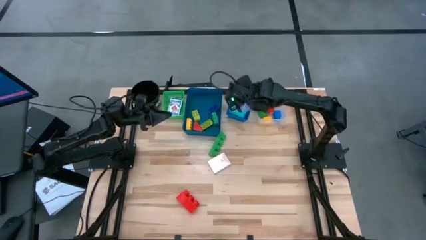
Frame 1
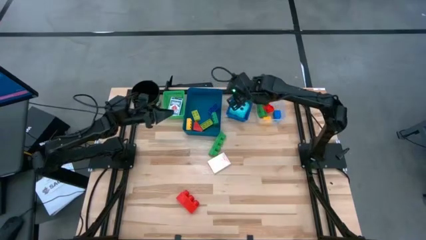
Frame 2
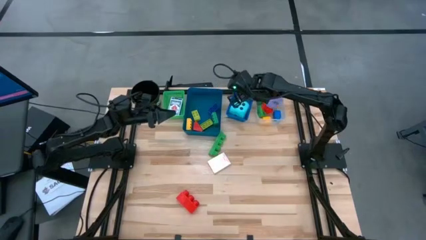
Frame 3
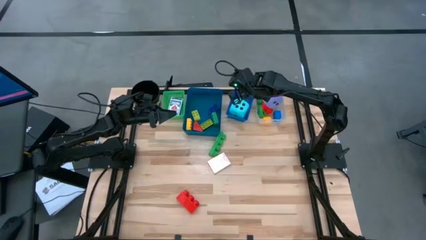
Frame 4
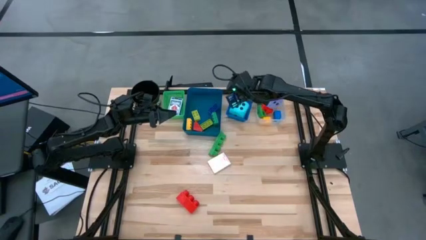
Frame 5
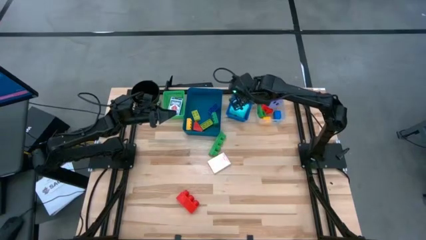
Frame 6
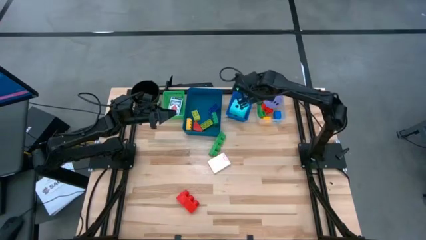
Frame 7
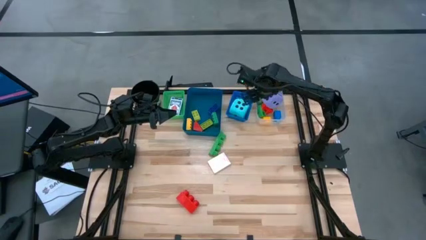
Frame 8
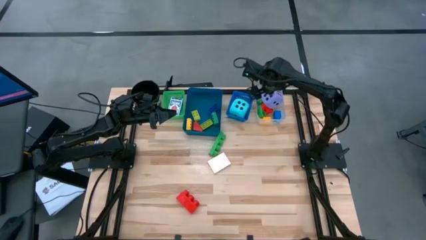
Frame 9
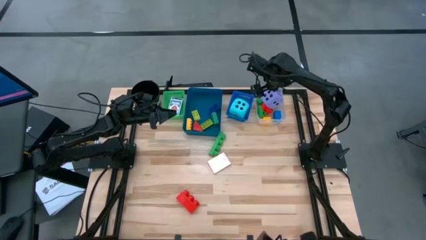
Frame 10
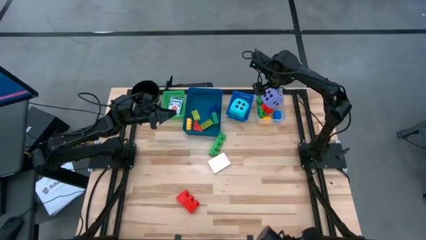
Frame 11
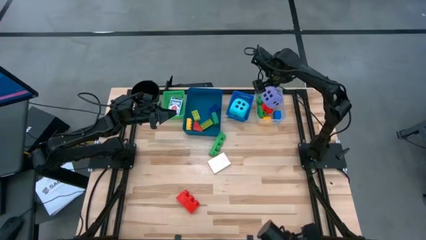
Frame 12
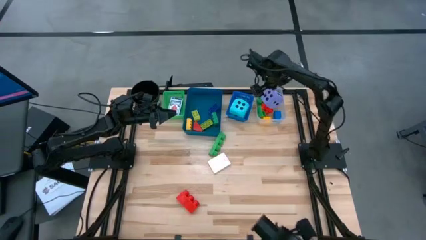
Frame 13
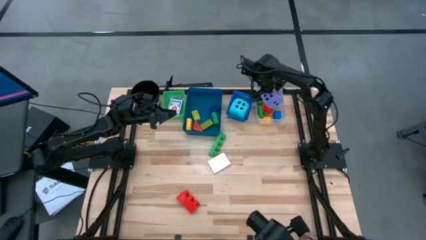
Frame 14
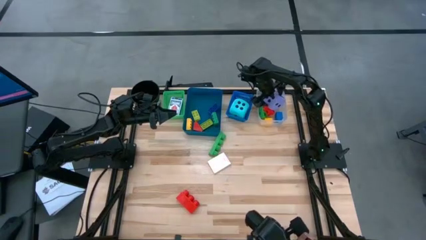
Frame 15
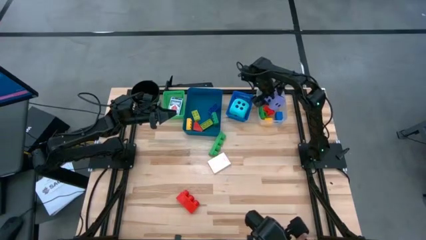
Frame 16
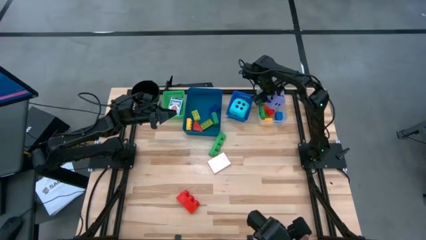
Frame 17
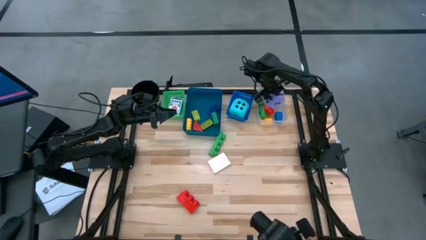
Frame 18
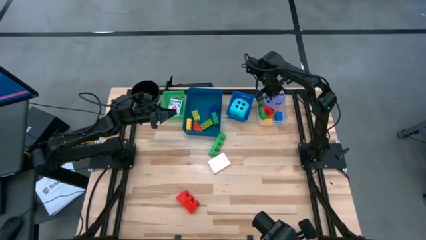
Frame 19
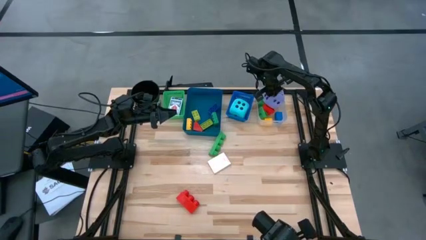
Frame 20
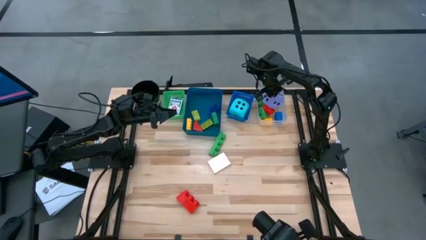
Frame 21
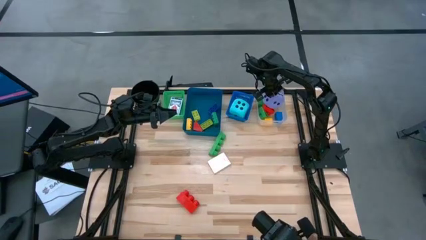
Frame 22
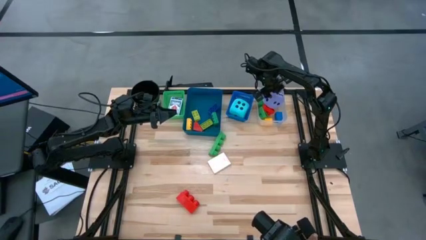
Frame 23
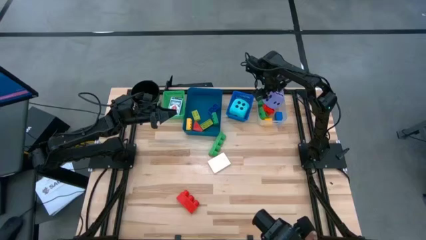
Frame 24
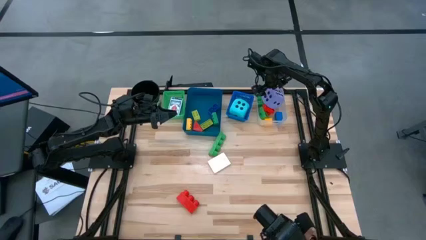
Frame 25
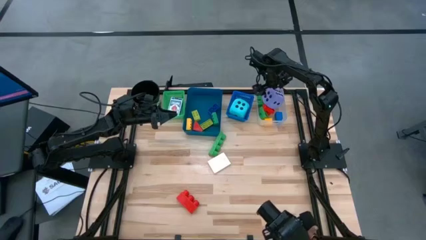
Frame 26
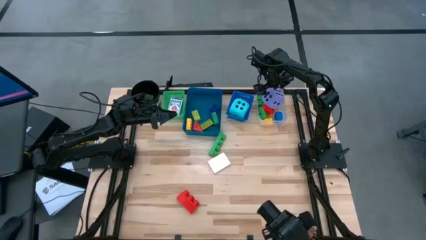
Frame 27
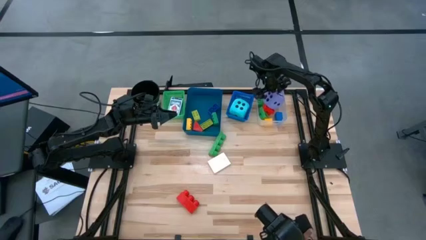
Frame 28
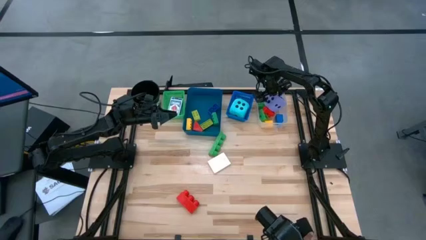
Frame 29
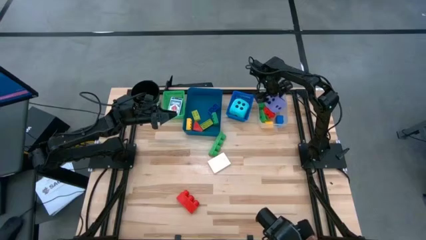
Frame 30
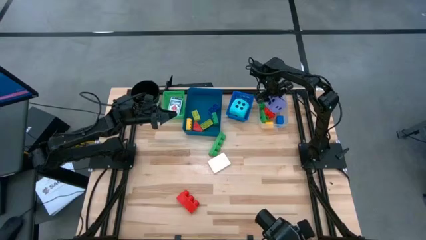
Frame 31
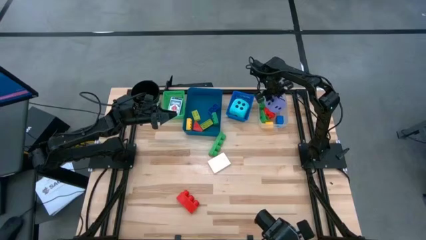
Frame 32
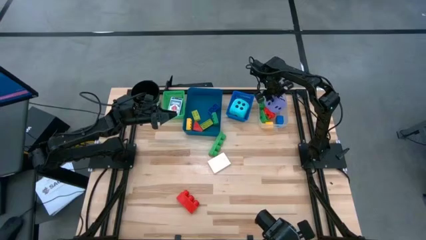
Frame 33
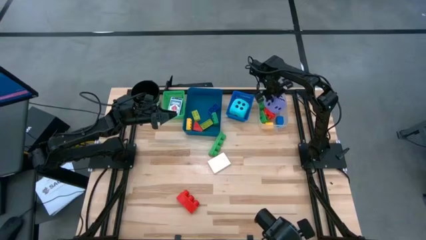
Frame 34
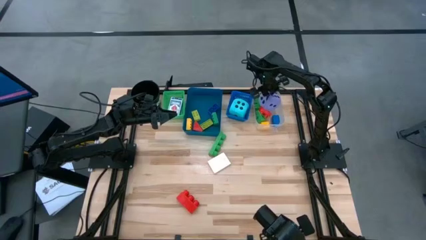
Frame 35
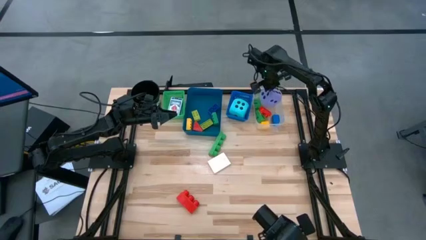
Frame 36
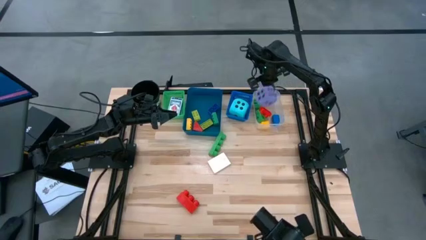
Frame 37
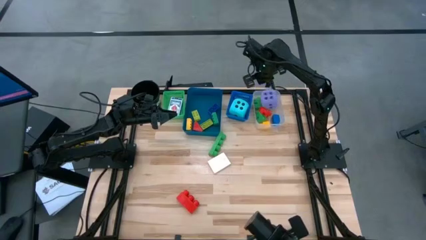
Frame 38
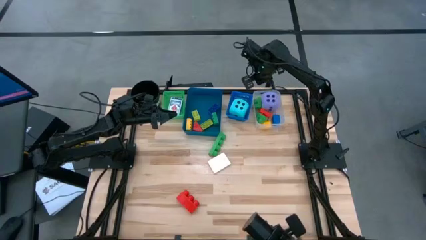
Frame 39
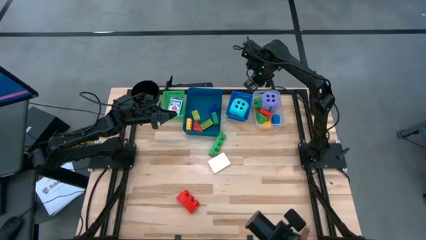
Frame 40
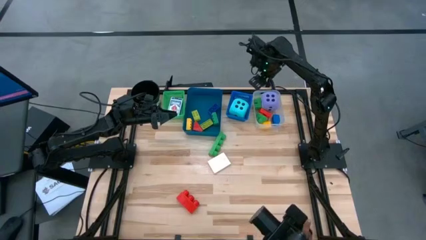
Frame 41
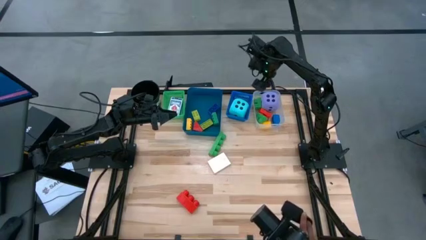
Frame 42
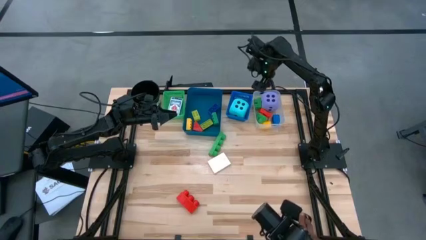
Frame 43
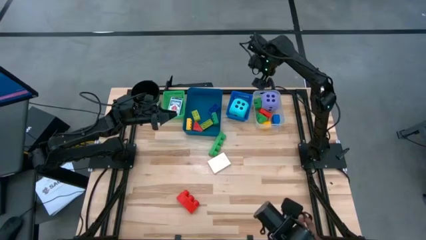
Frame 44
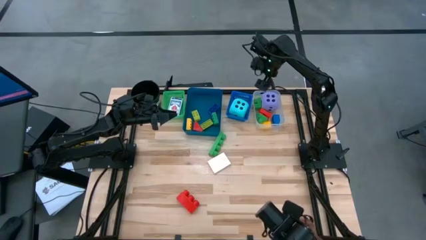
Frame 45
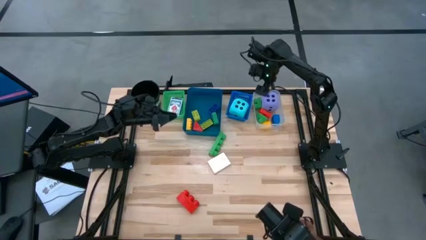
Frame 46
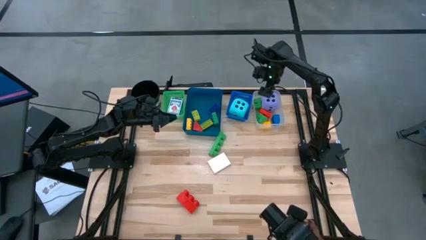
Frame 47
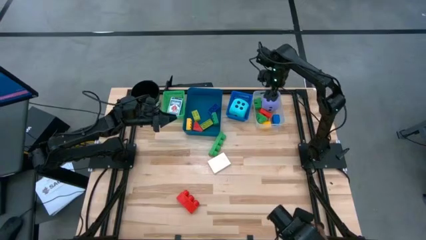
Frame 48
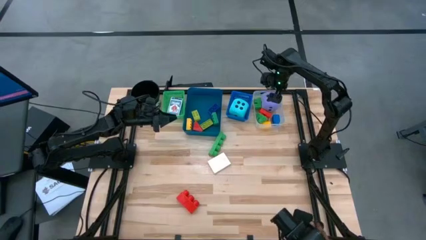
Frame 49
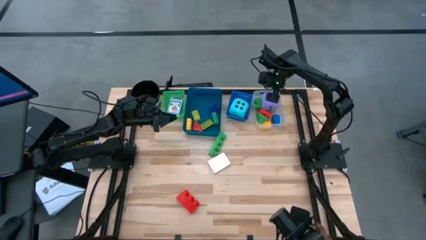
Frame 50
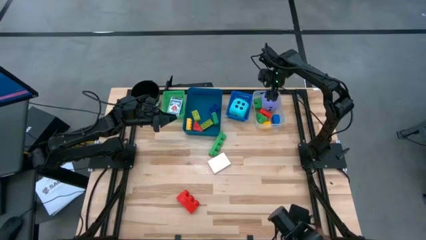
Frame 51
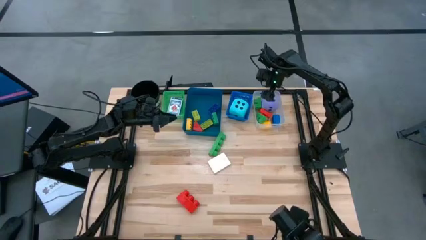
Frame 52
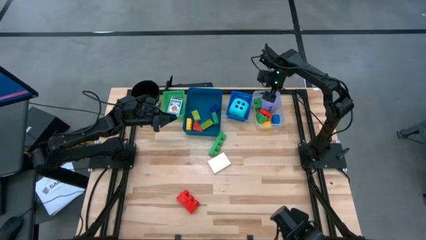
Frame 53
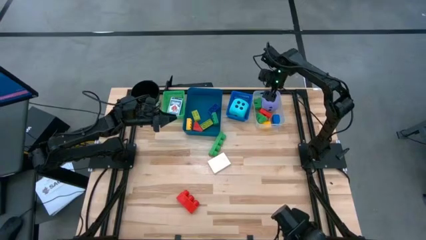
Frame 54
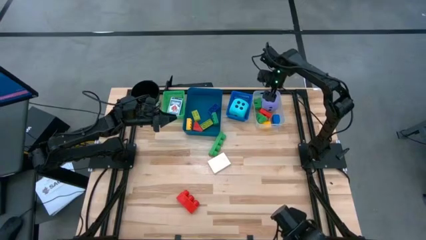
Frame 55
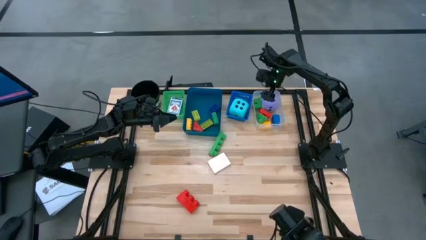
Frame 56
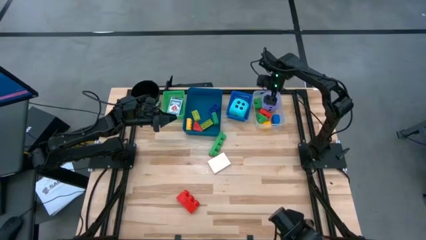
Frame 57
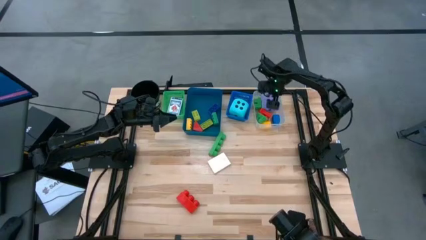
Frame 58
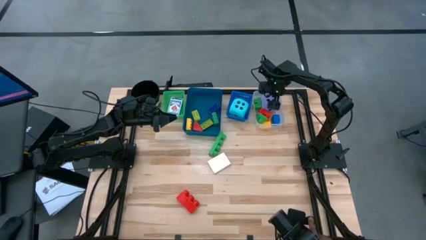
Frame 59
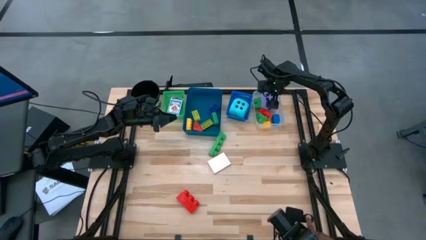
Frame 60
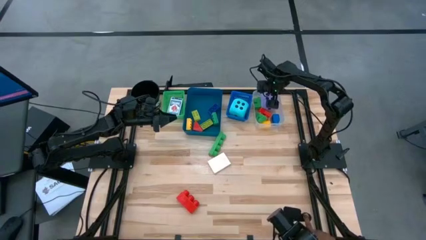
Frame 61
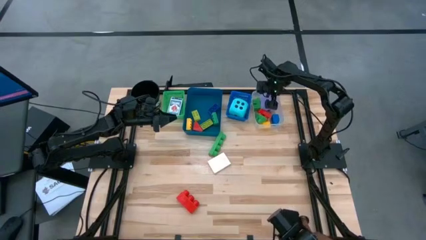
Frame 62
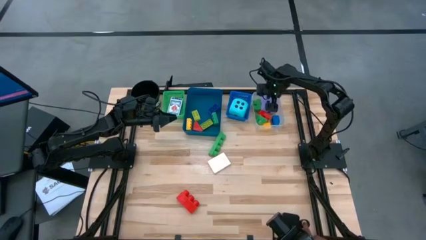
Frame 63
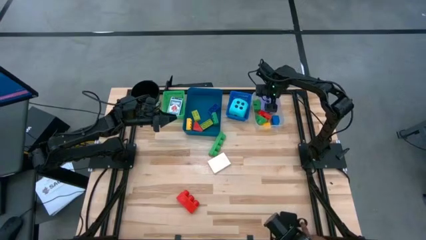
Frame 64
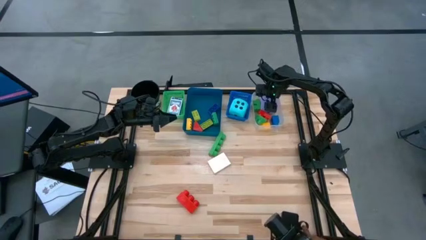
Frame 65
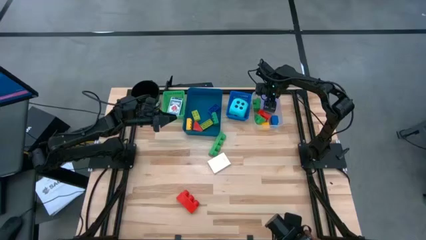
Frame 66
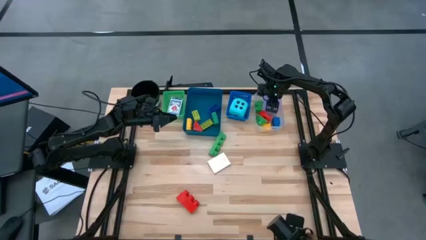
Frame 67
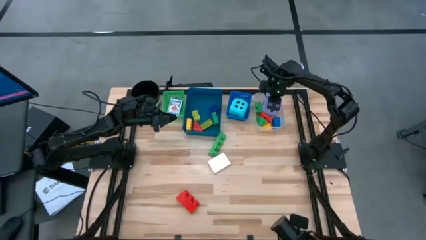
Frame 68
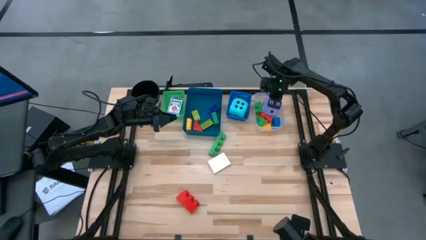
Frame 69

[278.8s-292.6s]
Task: Pick & Place Toys
Put the purple dice into the blue bin
